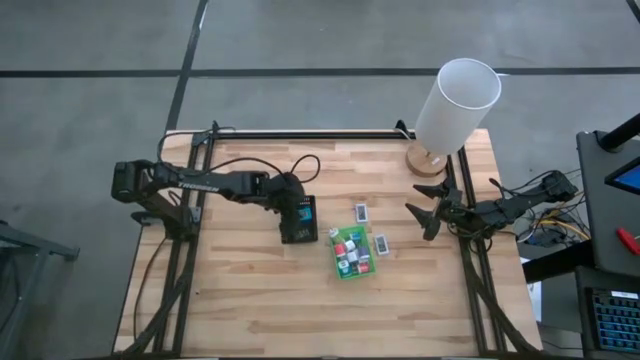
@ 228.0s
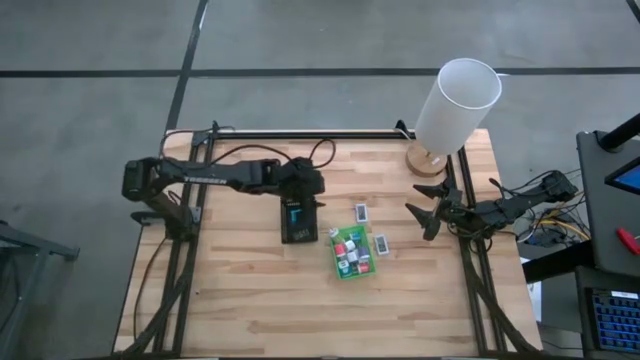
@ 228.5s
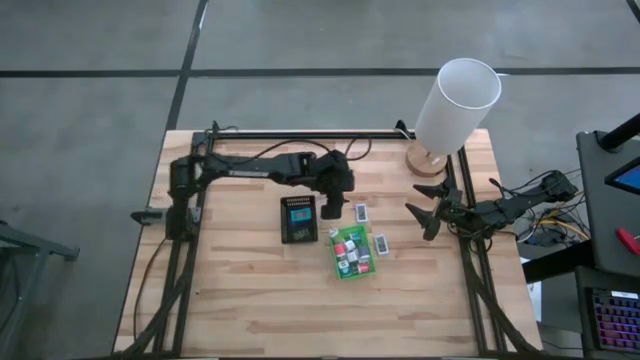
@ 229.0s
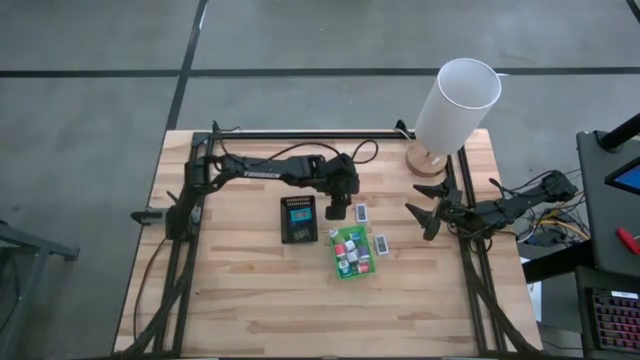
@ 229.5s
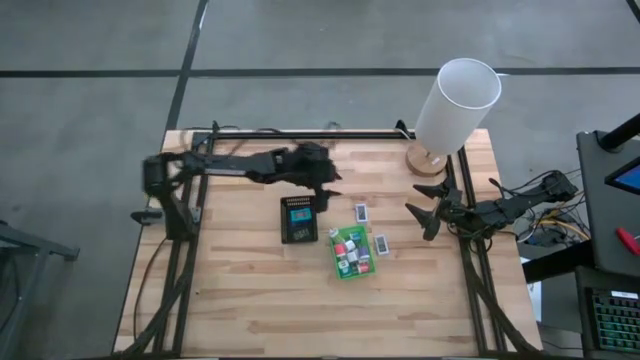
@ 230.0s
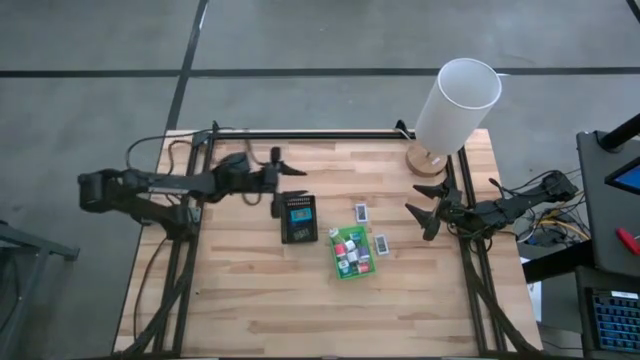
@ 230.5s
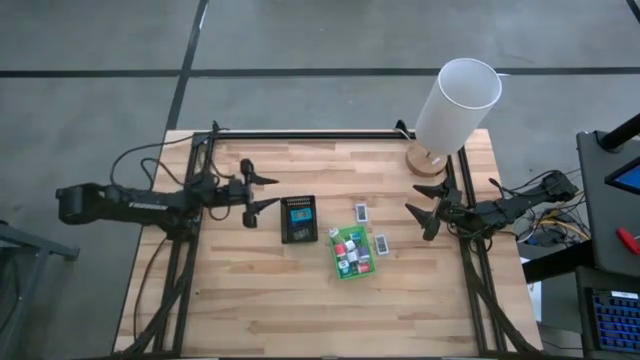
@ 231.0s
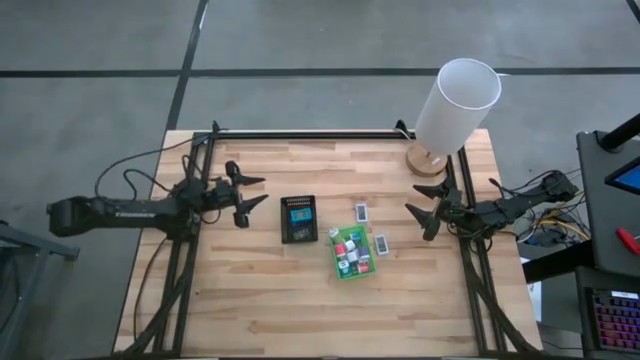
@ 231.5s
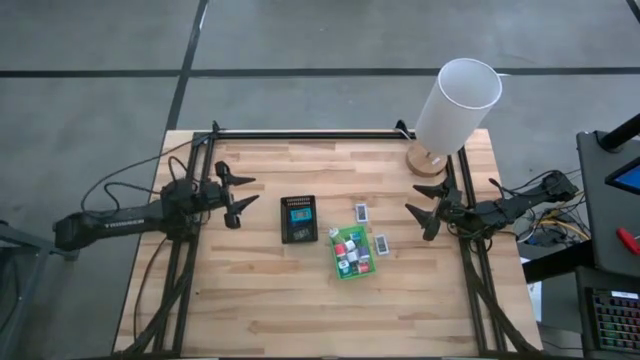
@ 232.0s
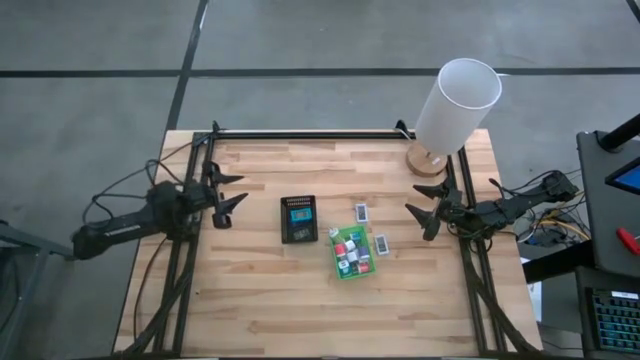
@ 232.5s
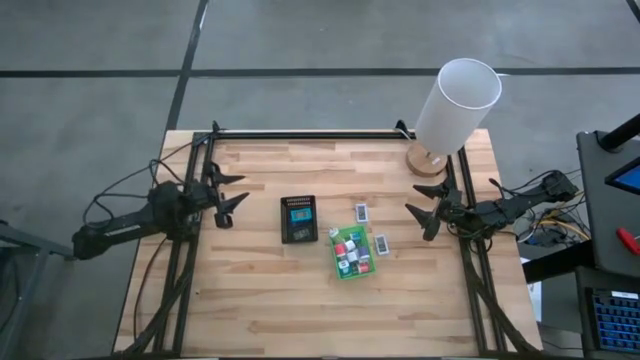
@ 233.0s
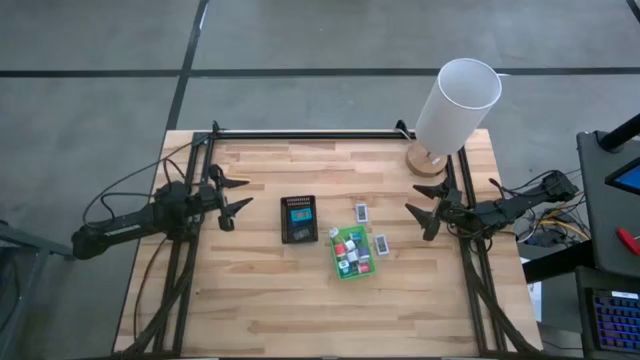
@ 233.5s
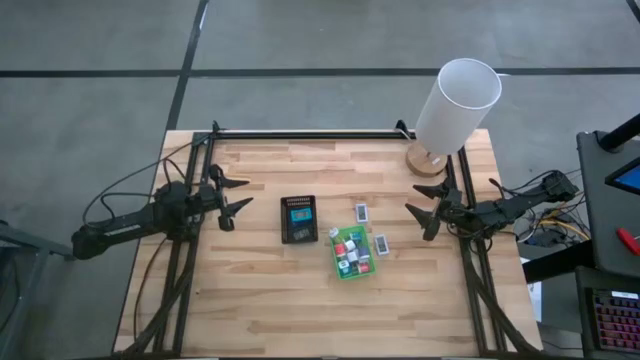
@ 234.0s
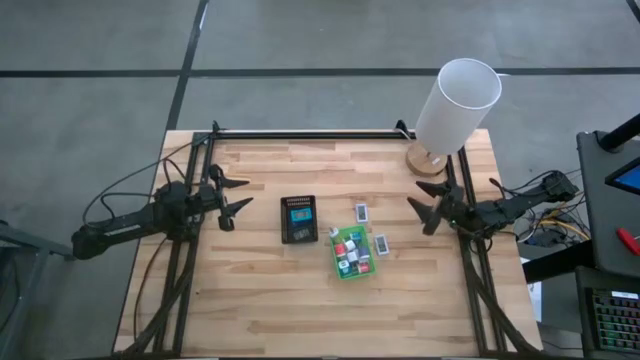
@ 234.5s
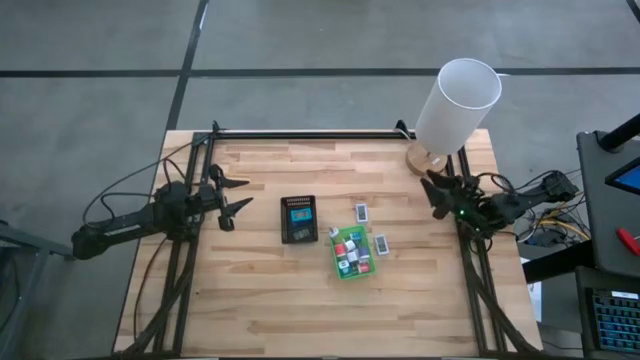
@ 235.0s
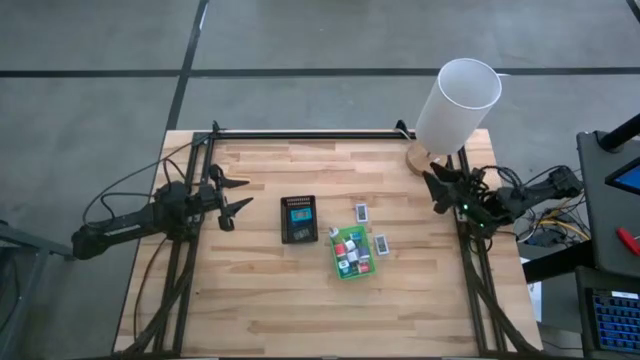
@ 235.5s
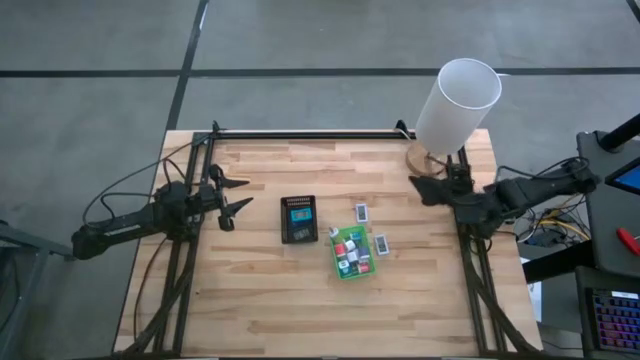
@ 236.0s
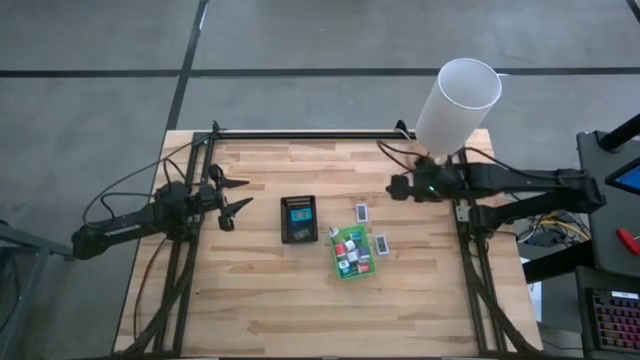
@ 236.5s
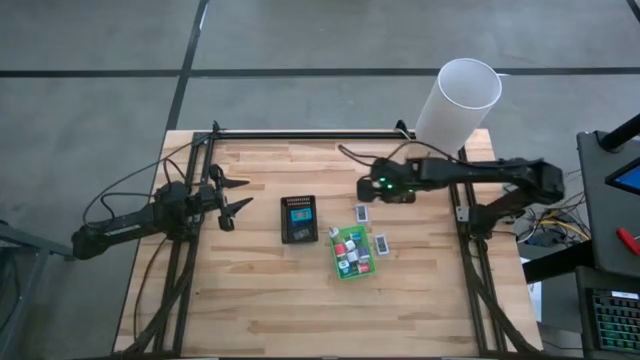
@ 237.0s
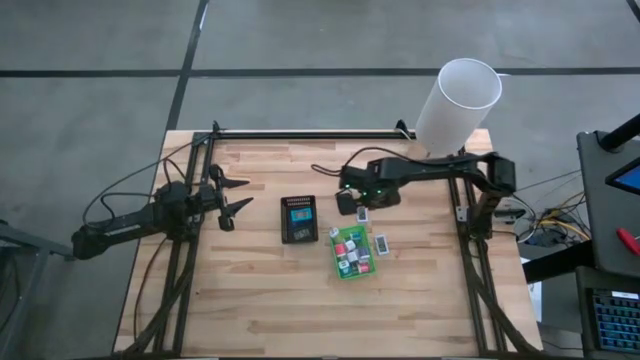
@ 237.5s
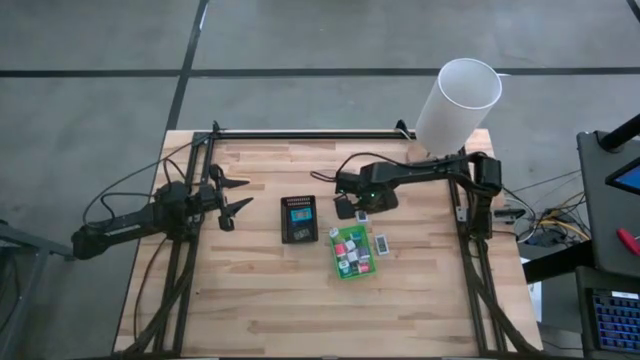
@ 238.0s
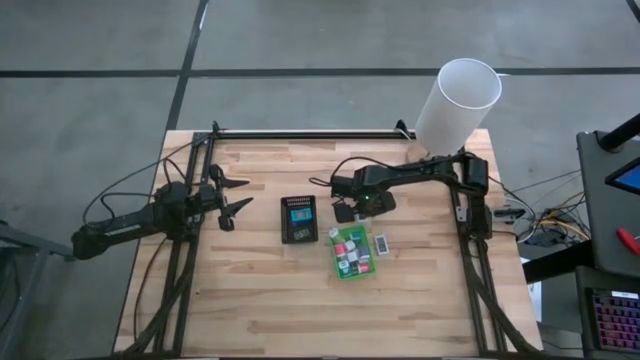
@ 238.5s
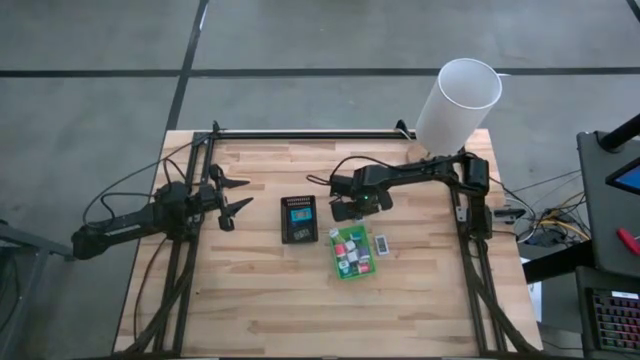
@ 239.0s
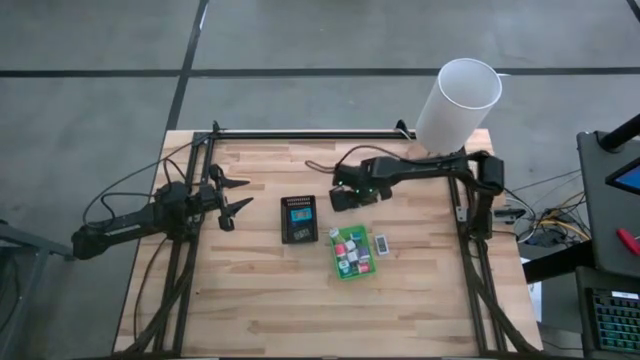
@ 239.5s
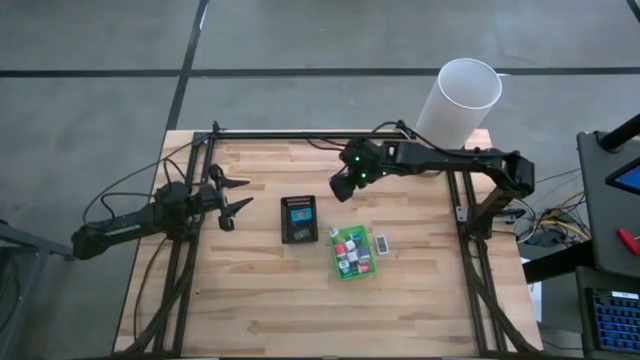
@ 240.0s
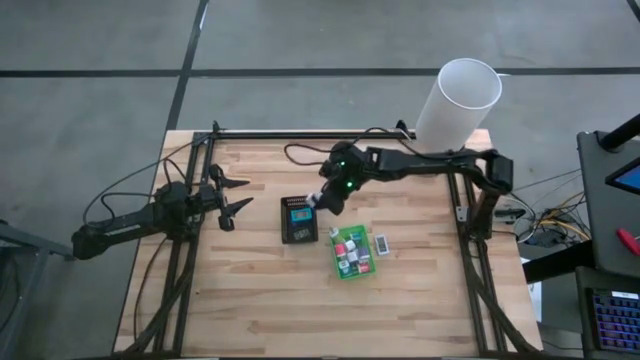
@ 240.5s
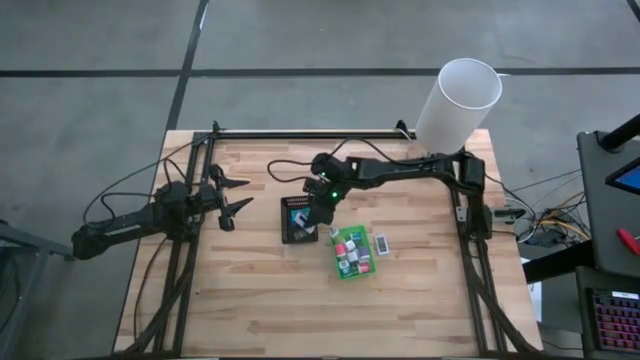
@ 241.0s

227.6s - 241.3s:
Task: Pick & Place Office items
Put the top white digital clock into the black bin

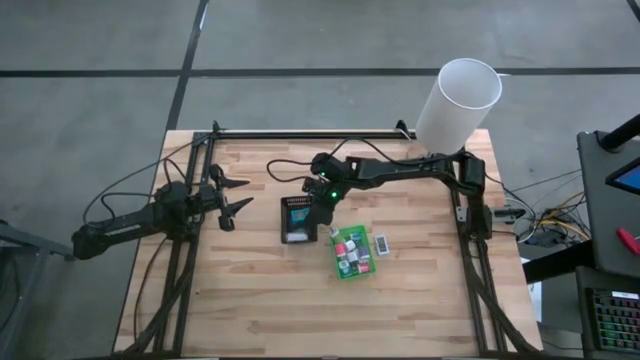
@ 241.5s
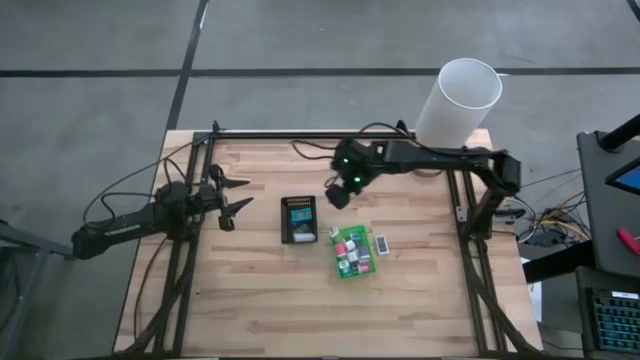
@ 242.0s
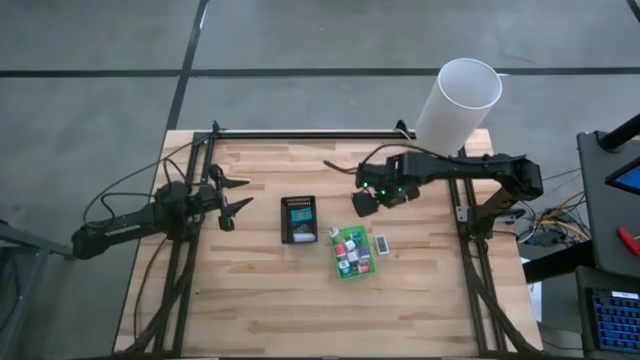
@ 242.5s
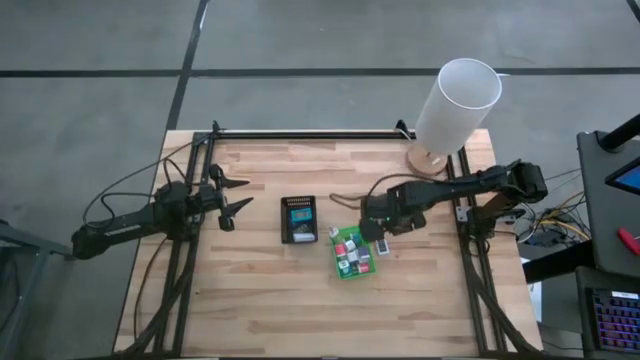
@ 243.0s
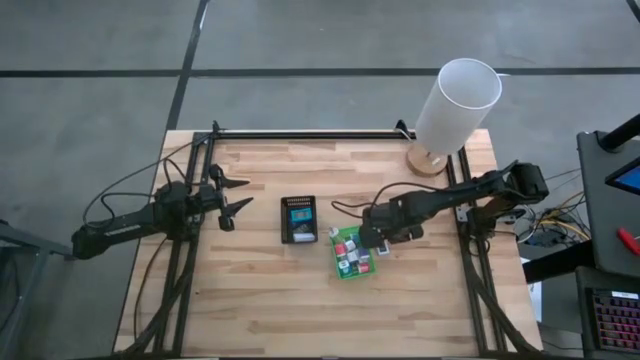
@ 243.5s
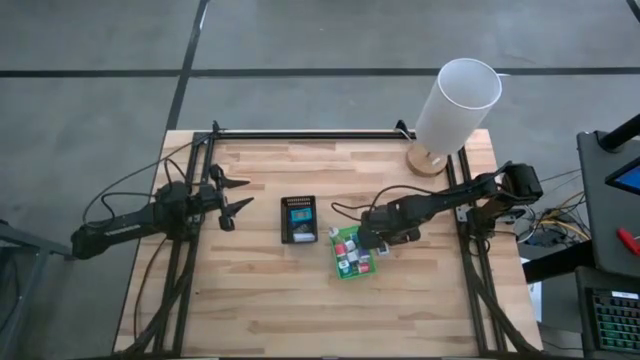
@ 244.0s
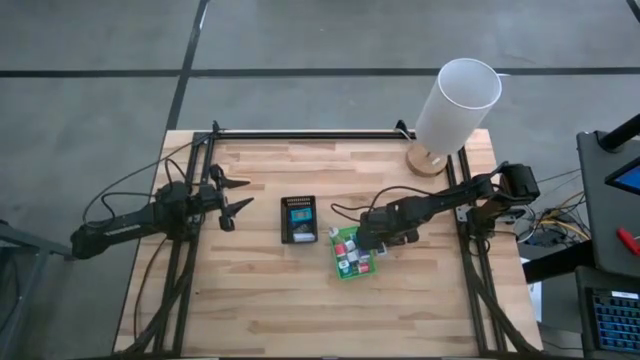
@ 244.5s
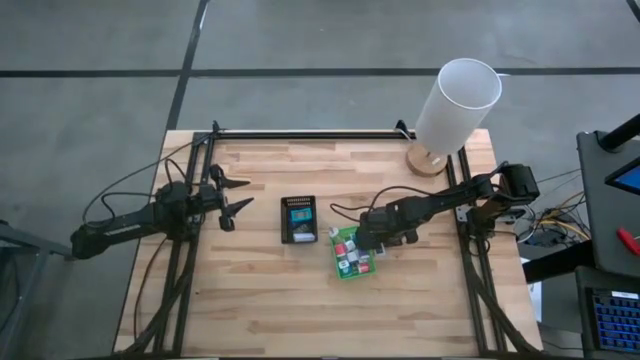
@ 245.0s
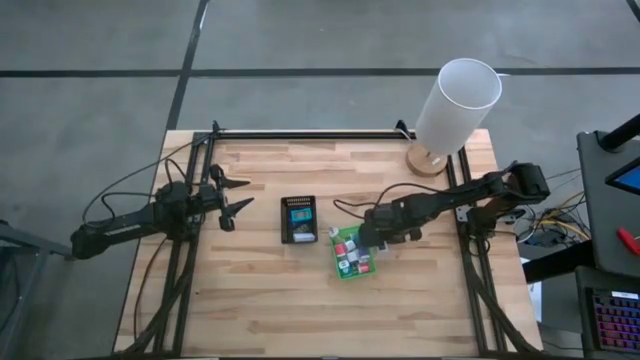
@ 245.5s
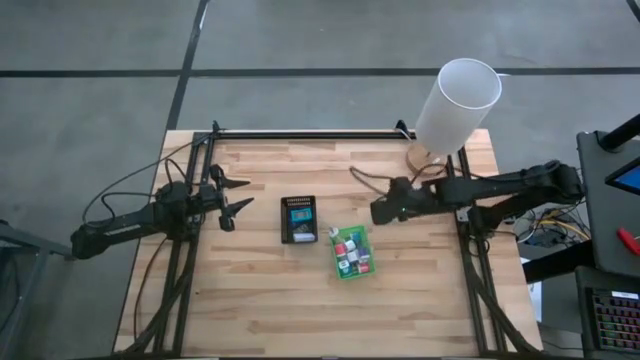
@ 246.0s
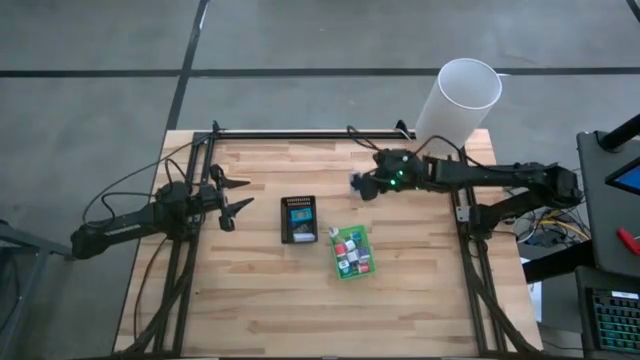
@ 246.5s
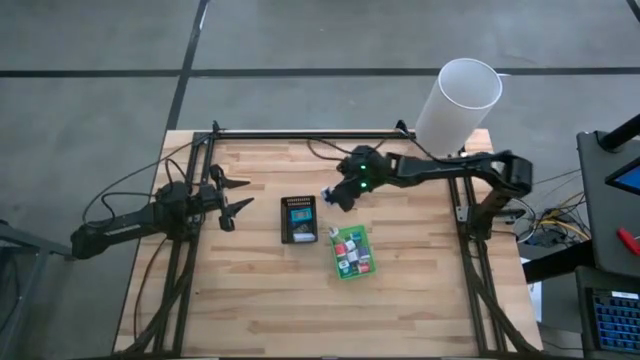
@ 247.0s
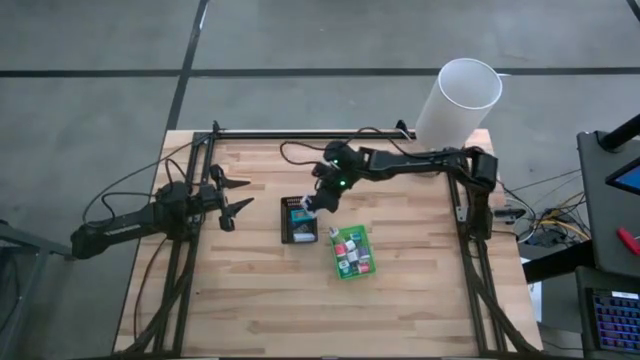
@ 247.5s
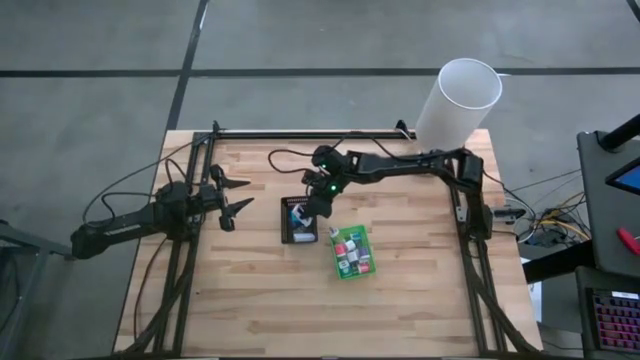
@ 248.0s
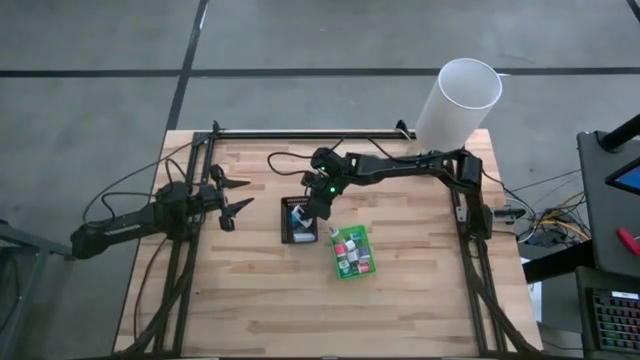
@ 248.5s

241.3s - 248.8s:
Put the white digital clock into the black bin
